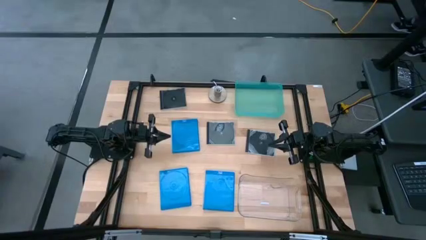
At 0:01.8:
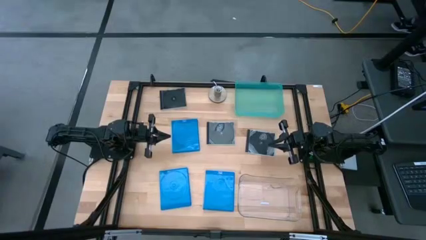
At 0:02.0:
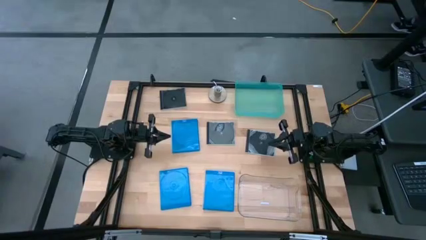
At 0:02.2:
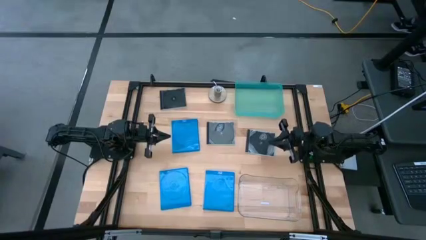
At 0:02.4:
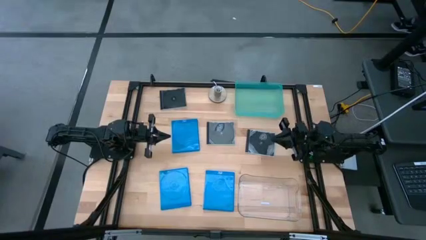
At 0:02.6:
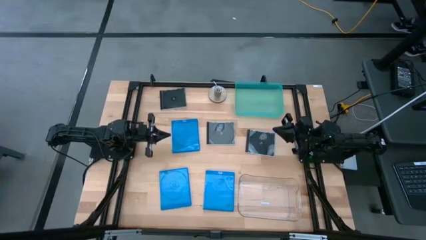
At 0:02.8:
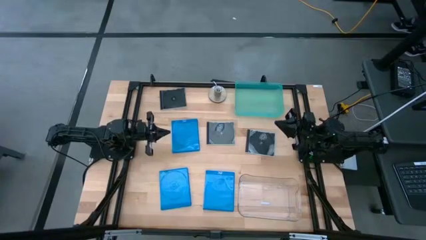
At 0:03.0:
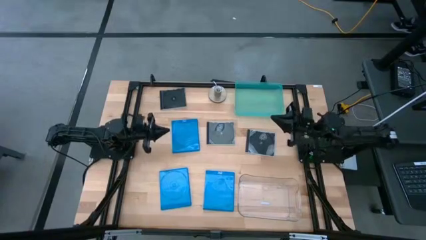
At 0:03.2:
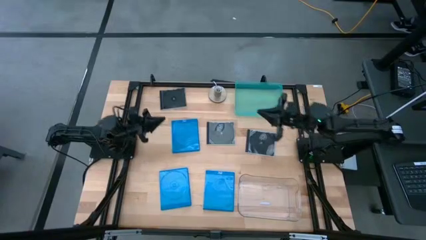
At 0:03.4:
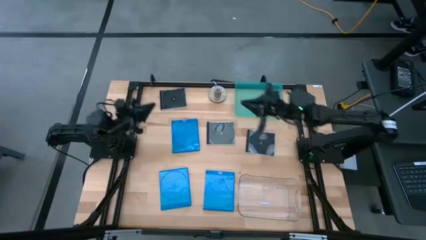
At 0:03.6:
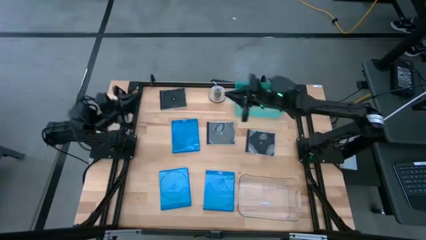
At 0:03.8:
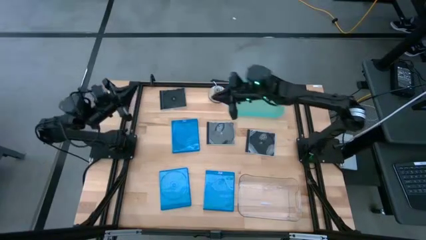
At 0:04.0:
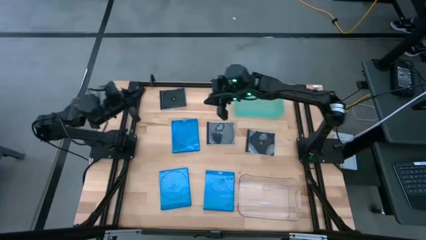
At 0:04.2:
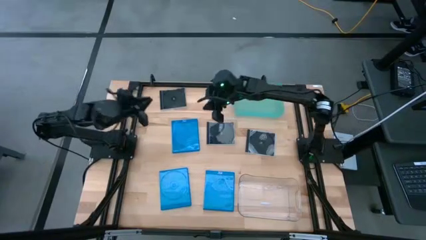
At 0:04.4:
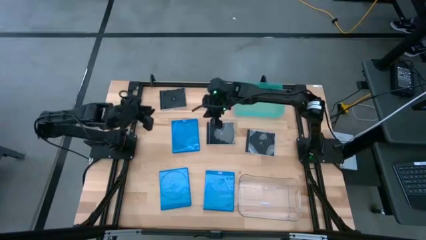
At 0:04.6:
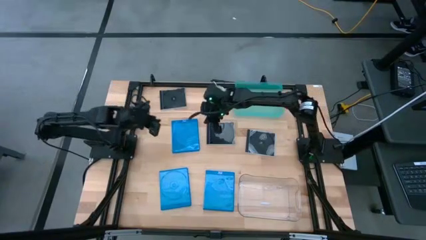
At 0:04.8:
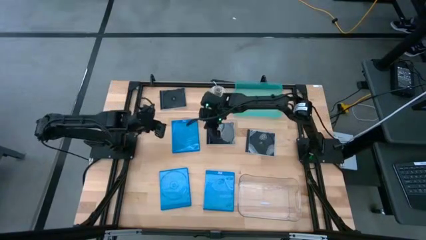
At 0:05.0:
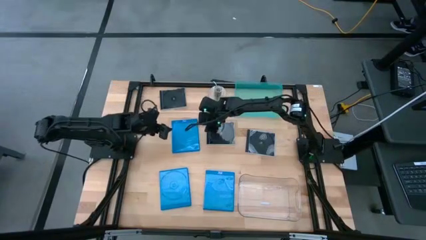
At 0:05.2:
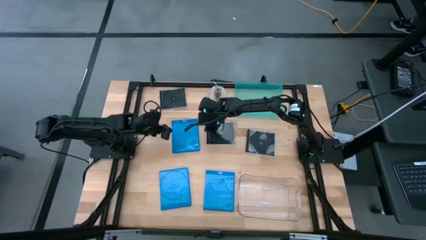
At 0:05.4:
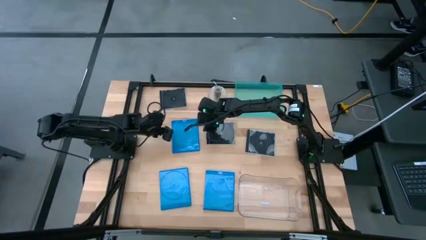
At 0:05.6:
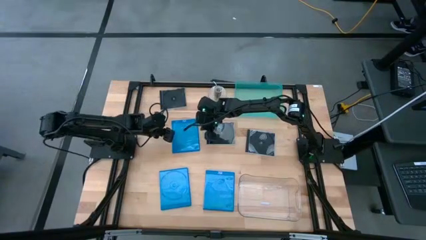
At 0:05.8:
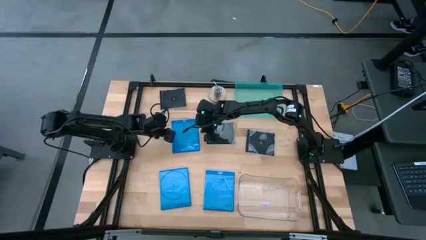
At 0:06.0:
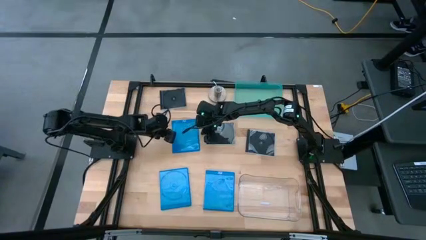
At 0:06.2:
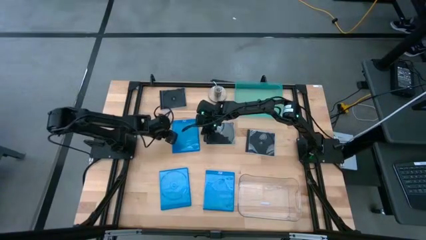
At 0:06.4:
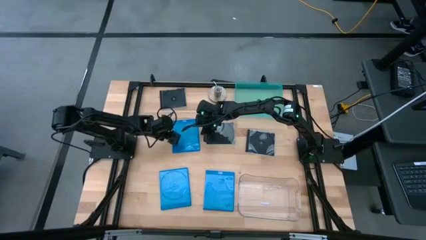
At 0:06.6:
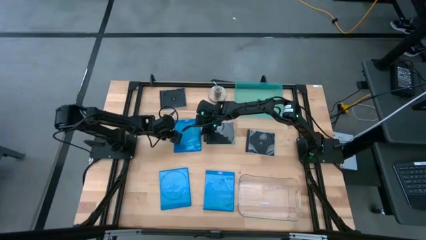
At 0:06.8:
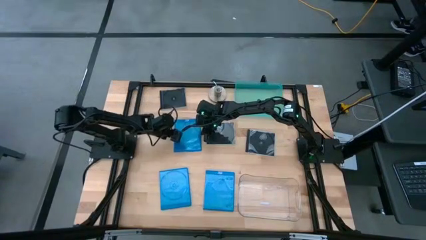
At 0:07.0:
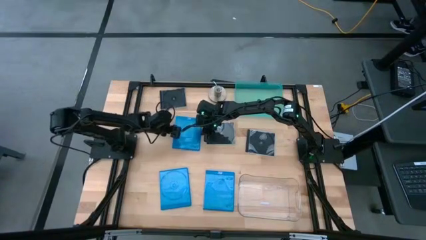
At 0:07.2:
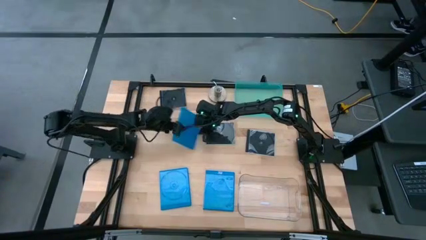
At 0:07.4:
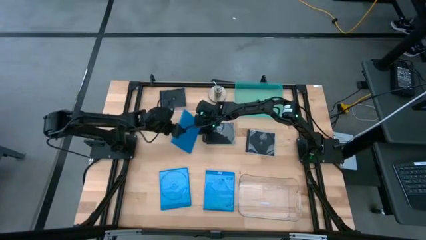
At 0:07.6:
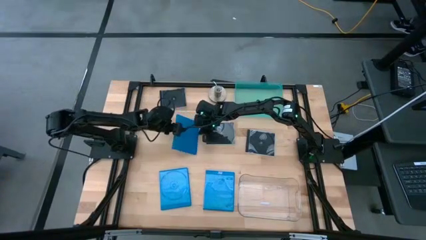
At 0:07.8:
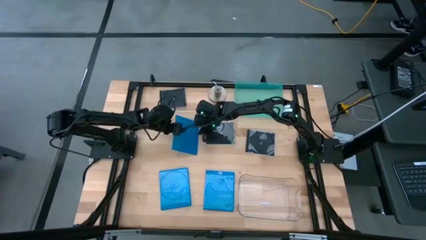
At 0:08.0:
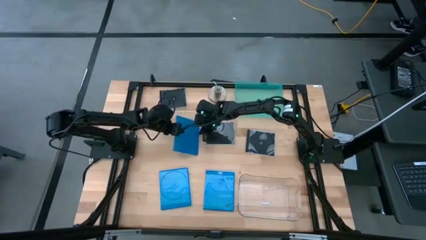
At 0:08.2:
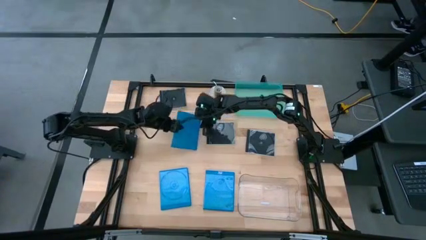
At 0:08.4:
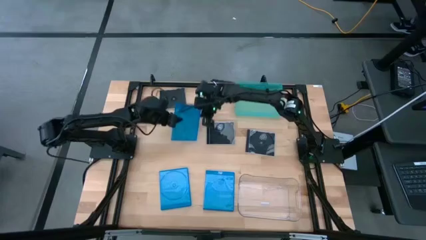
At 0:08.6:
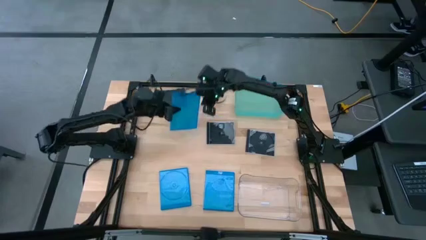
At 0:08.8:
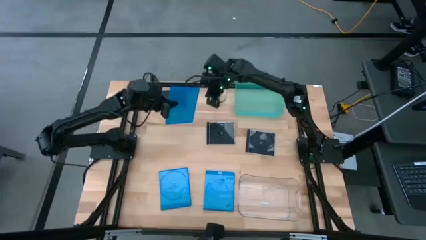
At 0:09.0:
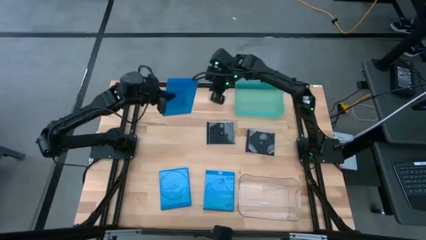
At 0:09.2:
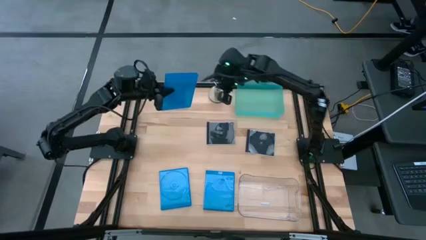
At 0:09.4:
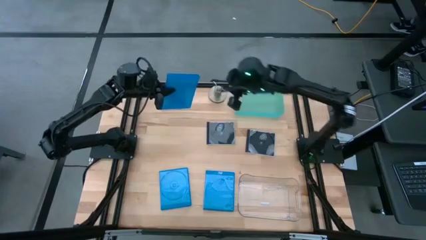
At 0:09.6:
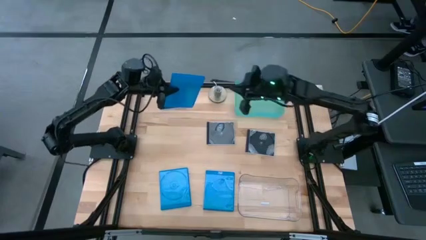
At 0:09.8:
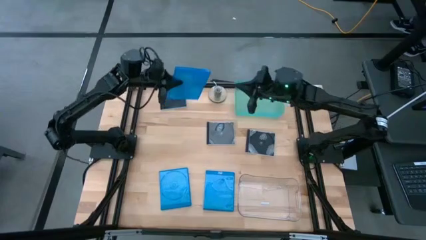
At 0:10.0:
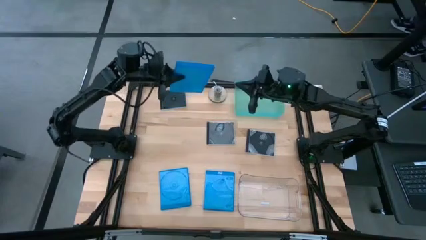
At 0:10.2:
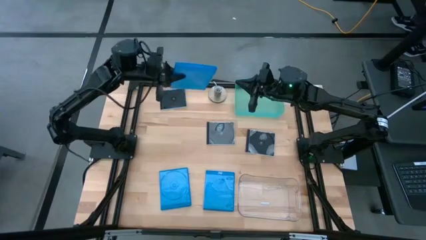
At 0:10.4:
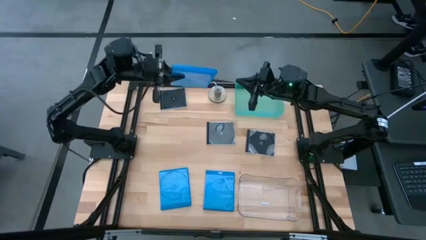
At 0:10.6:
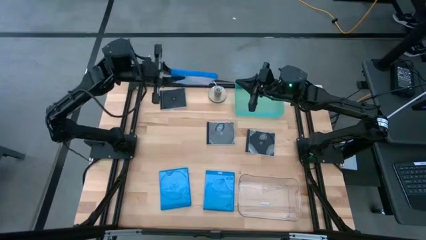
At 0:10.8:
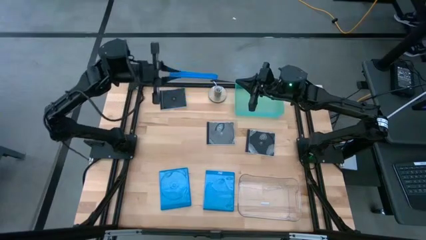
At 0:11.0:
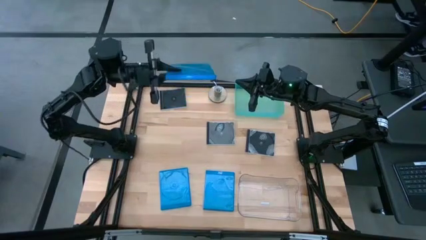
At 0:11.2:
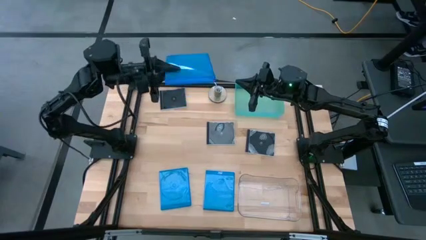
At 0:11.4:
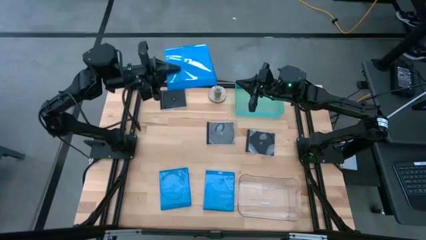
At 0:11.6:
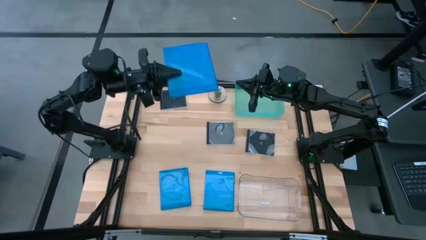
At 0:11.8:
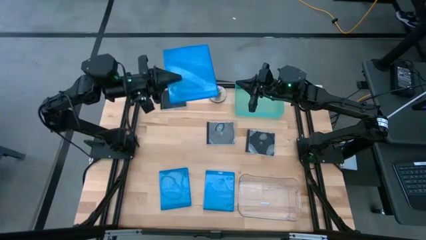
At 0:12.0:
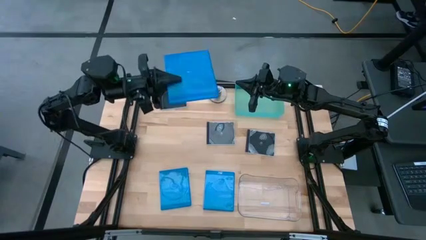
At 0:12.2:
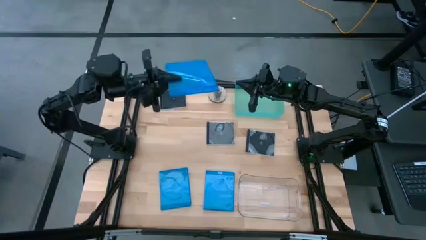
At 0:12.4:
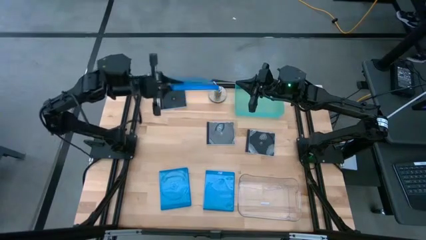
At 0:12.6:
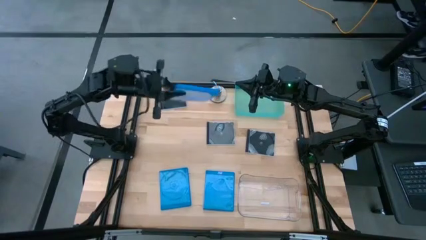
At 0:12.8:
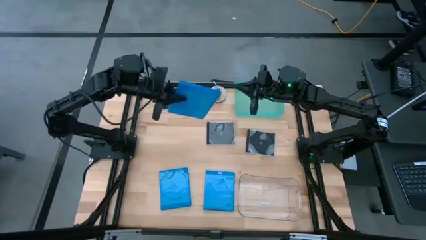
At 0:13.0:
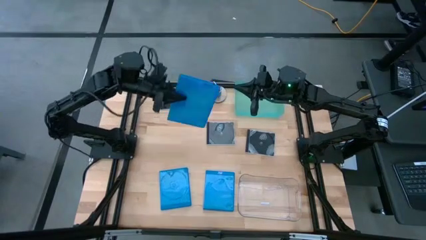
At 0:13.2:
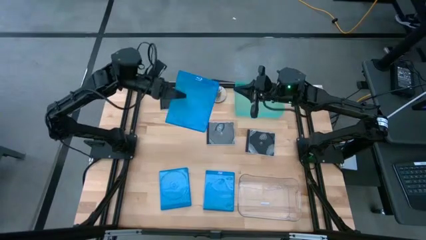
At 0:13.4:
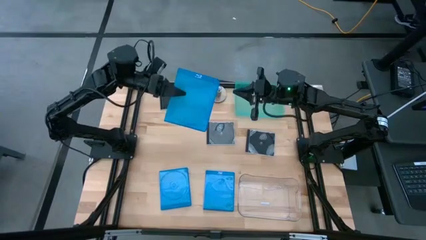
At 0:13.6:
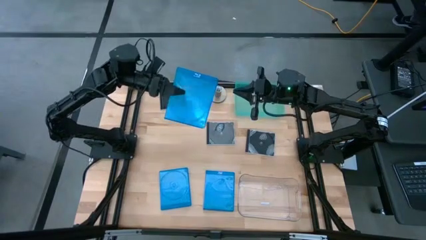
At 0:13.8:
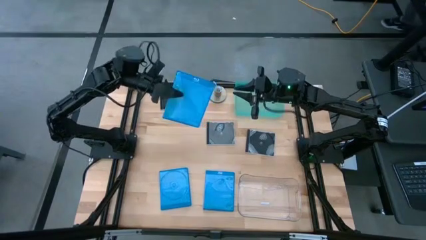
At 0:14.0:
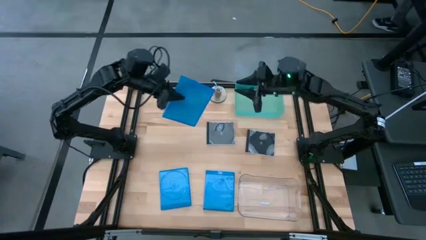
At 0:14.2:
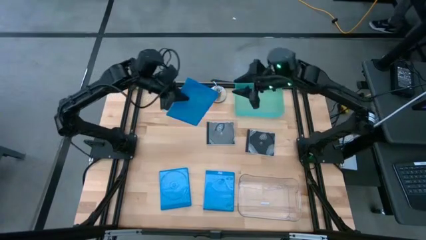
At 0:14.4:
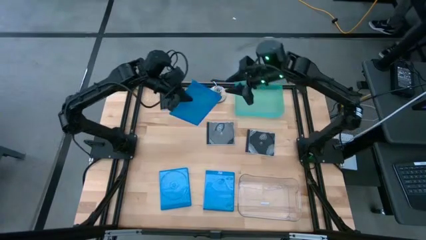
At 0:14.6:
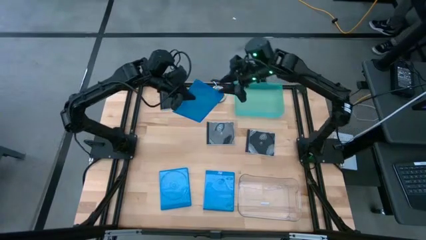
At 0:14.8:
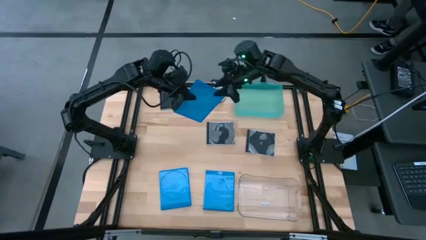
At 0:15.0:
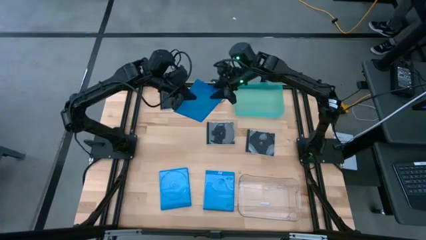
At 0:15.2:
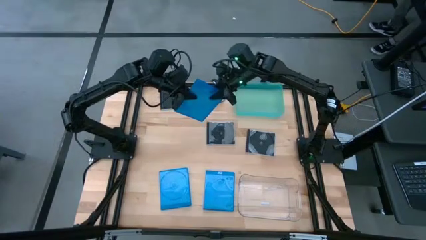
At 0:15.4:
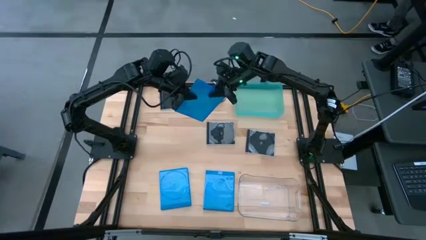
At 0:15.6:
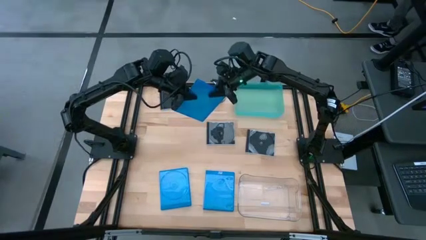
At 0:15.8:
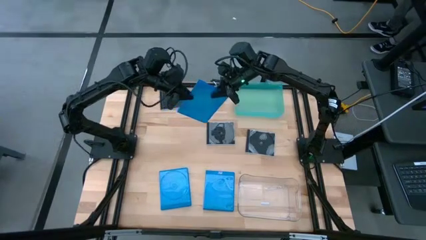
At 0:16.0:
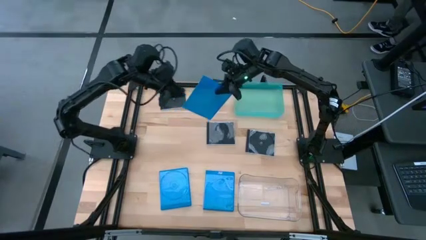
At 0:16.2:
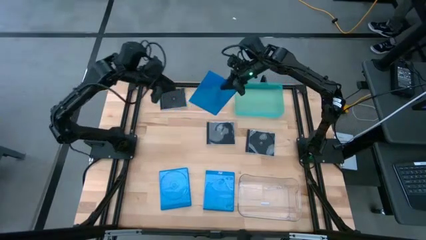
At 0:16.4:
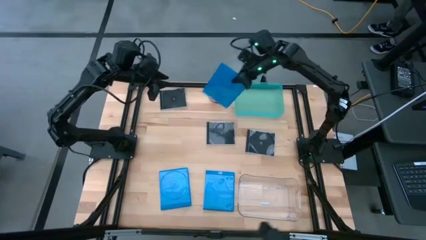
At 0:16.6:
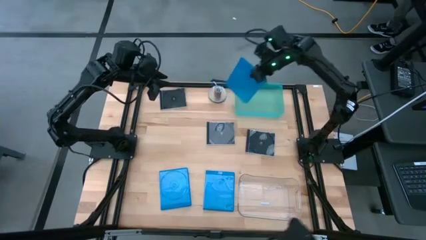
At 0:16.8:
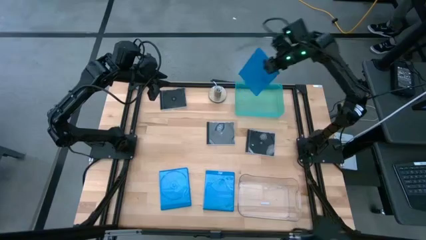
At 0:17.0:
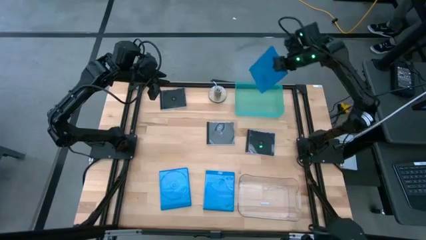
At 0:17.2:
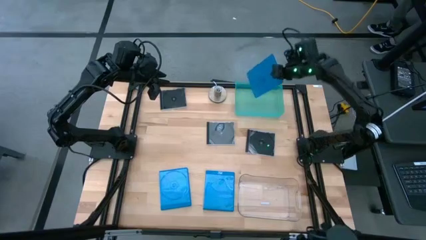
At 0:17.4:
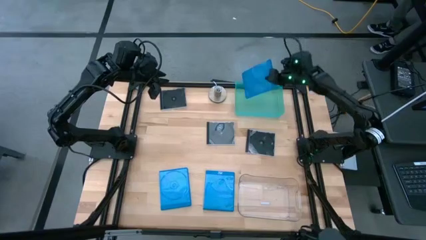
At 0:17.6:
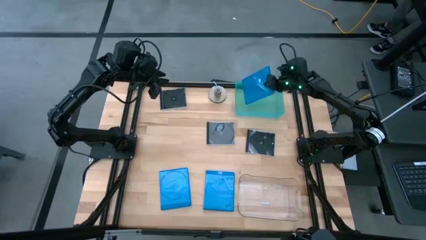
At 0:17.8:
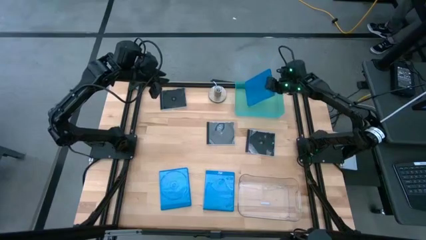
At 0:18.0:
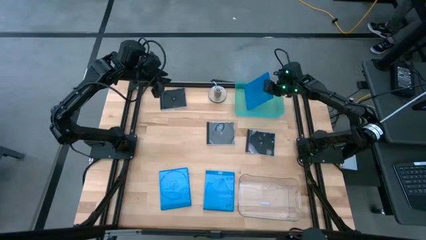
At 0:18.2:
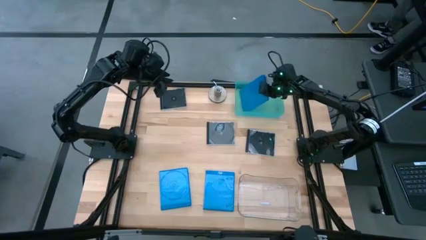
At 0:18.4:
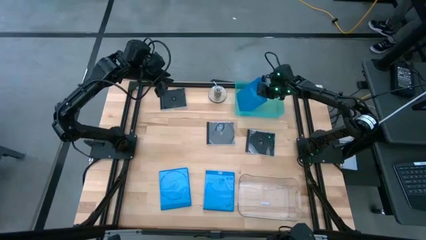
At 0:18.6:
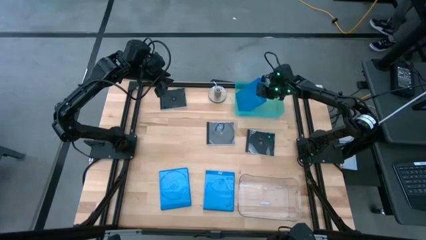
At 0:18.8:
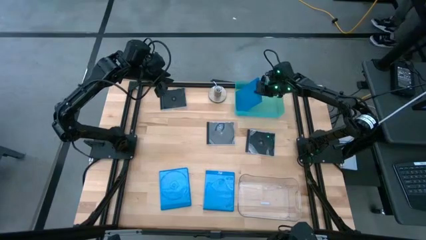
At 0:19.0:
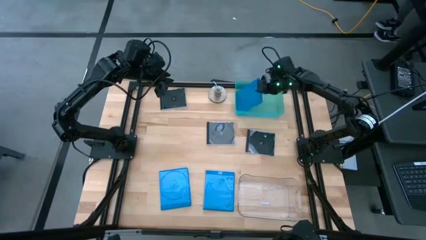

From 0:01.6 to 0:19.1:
Task: Pick & place jewel cases by type
Put the top blue CD case into the blue bin
